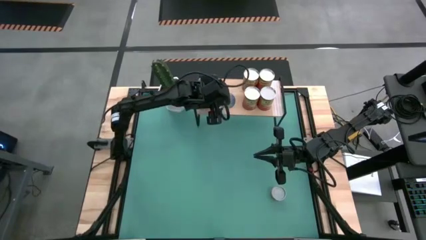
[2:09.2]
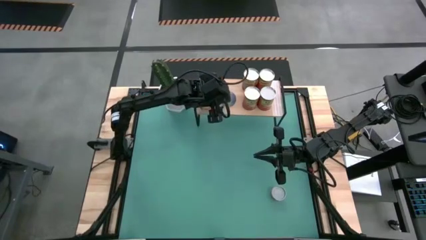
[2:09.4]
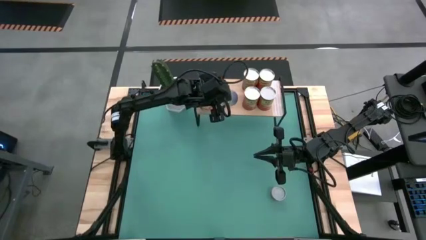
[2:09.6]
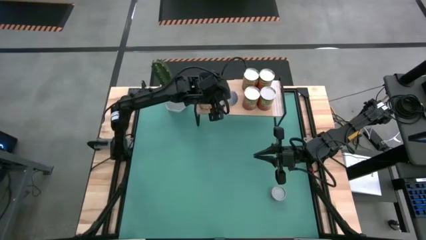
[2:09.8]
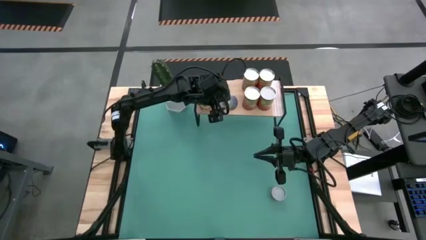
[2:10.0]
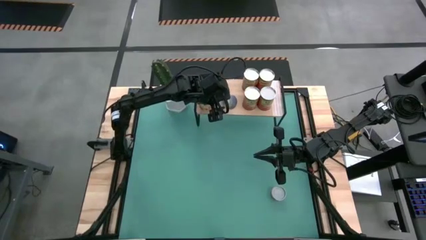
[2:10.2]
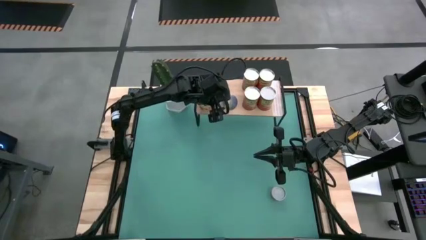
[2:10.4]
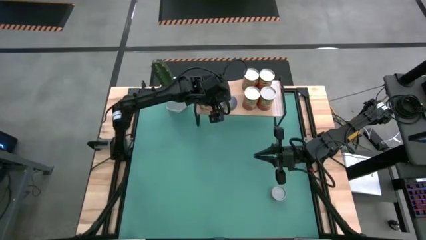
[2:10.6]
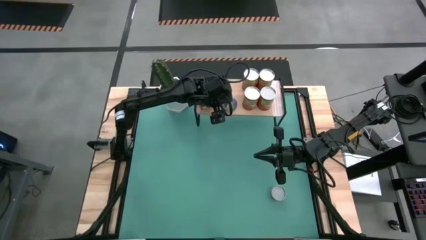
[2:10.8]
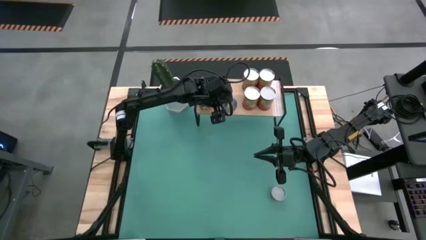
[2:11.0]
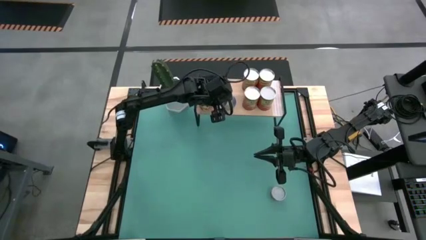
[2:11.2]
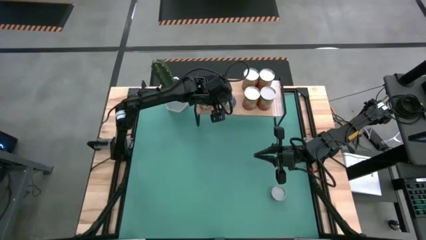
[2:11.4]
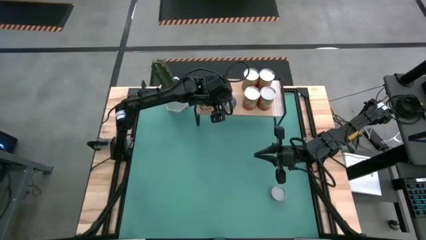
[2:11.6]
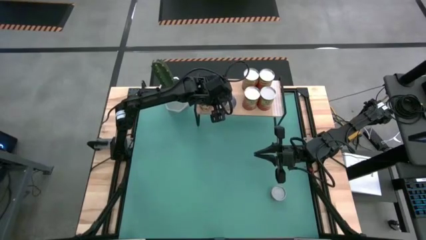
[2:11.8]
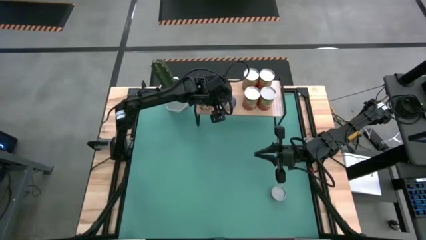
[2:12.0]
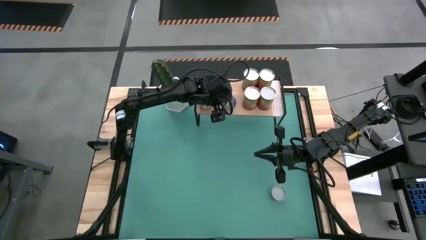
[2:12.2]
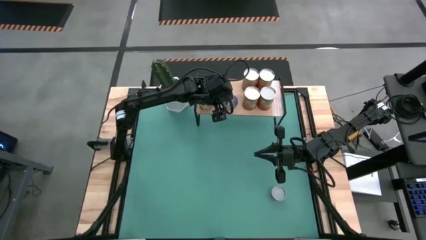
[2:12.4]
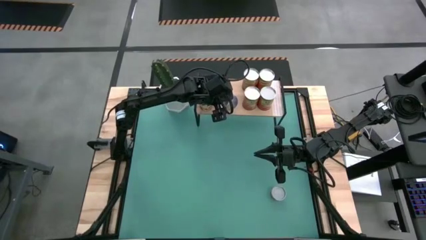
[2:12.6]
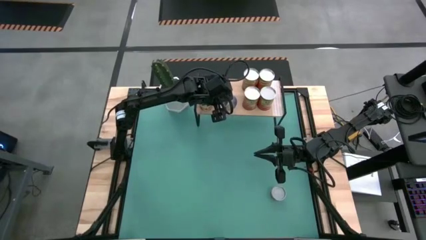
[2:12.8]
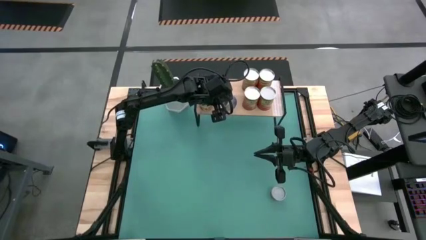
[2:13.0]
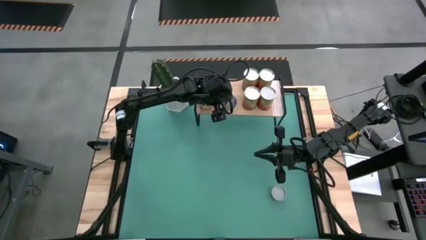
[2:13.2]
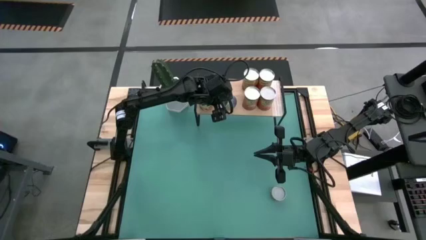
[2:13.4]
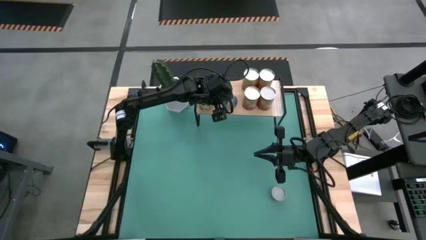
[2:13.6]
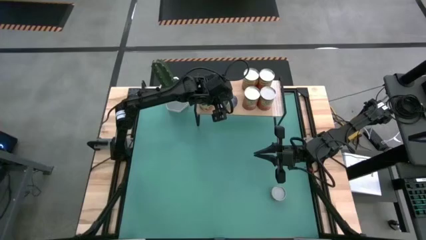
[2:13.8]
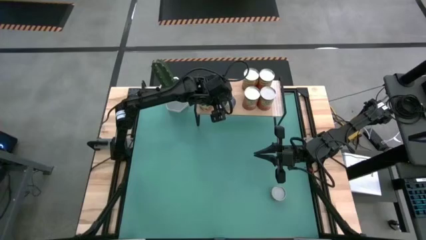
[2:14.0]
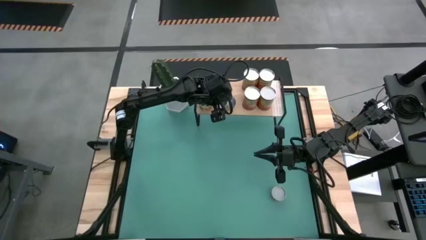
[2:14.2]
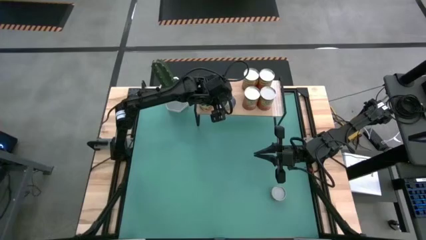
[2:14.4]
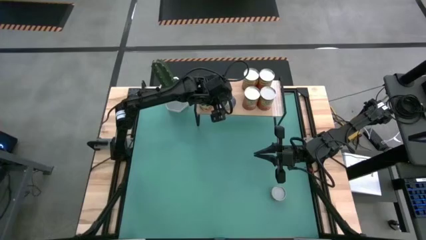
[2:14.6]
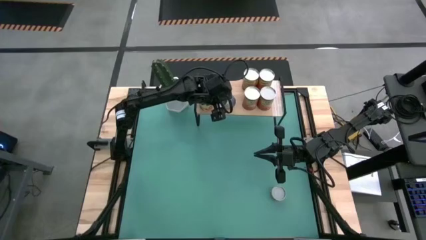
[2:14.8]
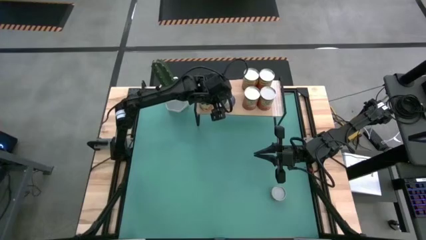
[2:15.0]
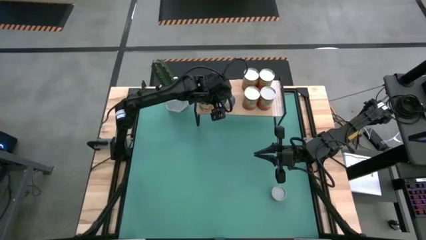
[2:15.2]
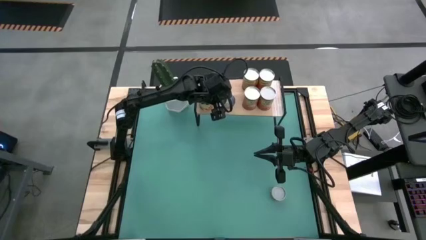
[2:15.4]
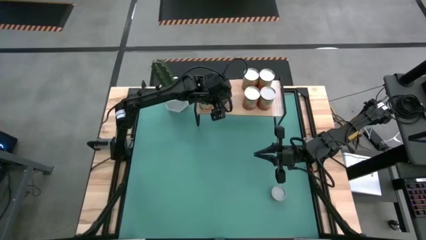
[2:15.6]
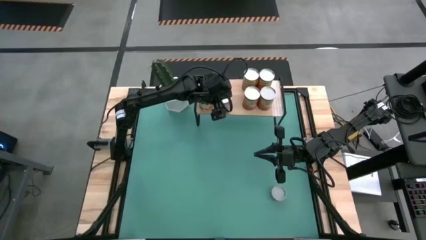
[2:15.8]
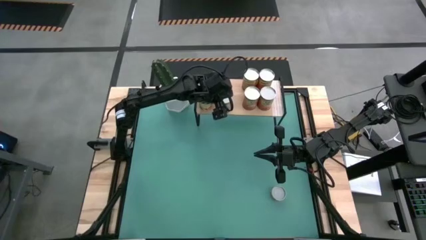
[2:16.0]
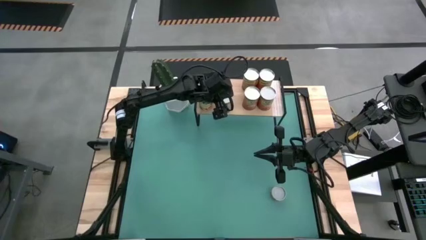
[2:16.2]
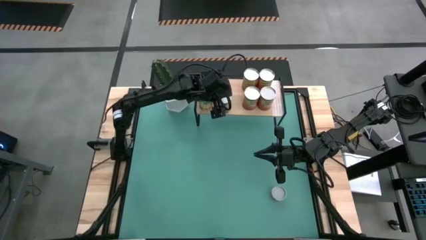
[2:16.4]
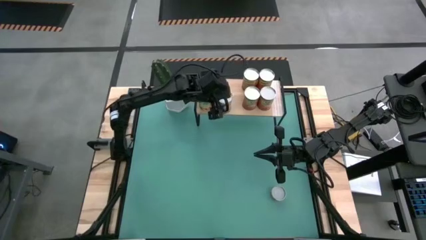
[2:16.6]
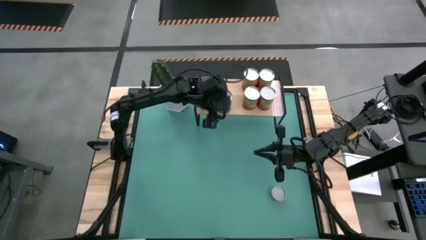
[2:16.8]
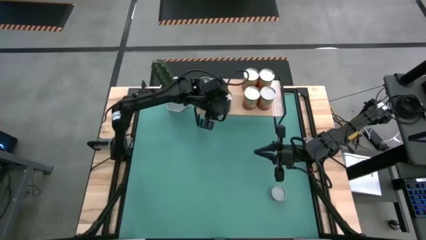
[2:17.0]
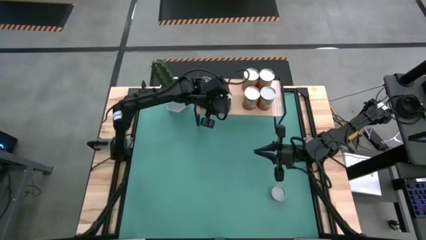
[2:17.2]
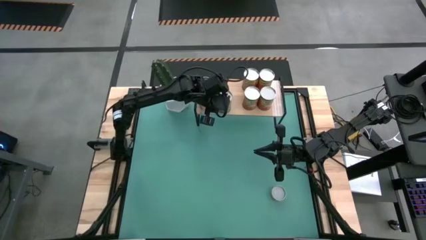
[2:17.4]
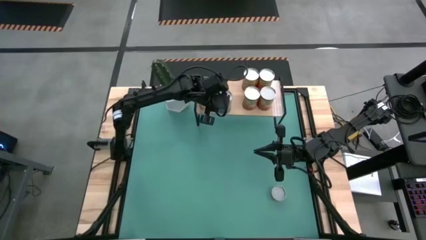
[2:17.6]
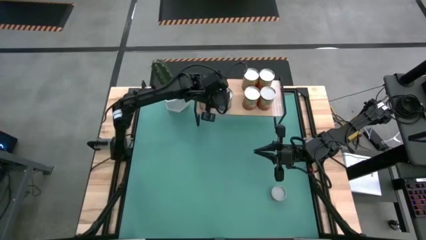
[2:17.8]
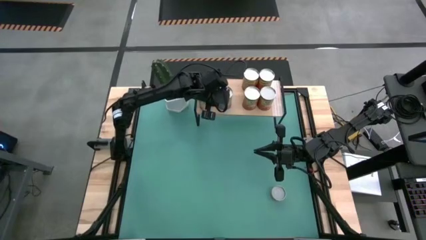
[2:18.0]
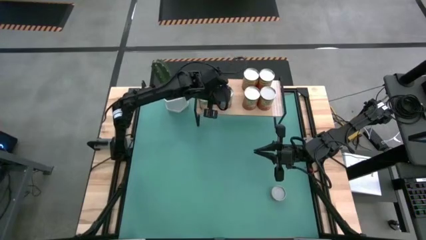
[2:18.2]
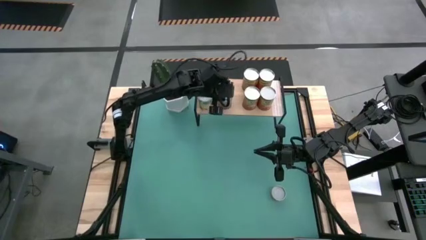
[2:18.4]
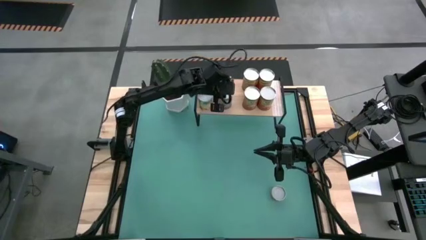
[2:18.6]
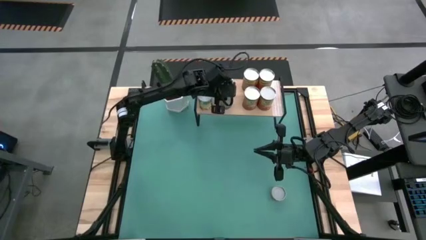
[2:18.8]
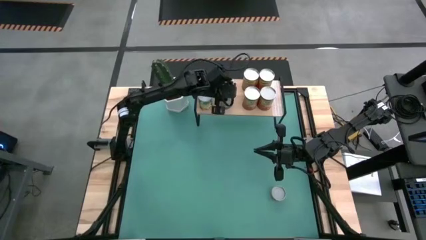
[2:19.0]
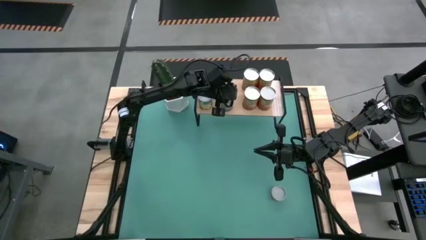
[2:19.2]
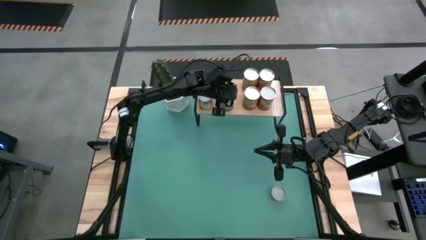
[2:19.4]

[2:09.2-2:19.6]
Task: Pick and place cans onto a shelf
Put the canned peas on the shelf

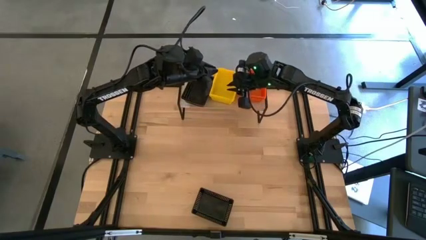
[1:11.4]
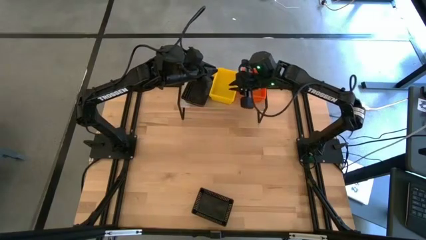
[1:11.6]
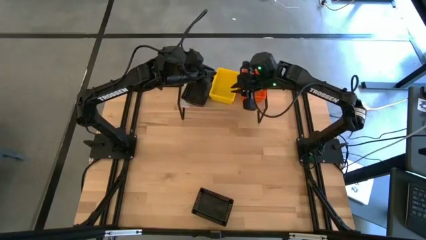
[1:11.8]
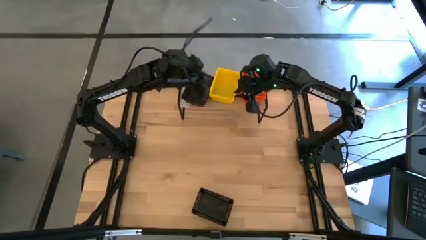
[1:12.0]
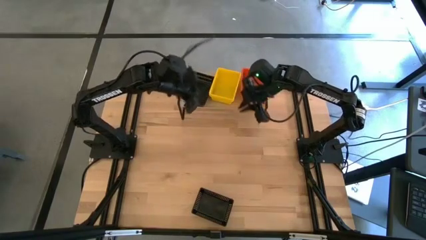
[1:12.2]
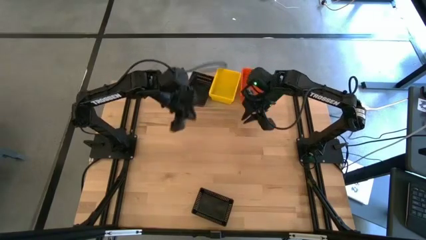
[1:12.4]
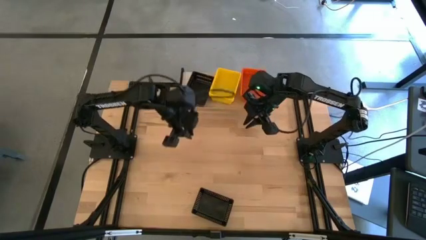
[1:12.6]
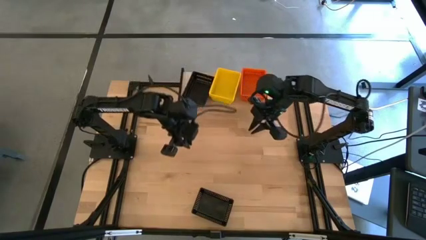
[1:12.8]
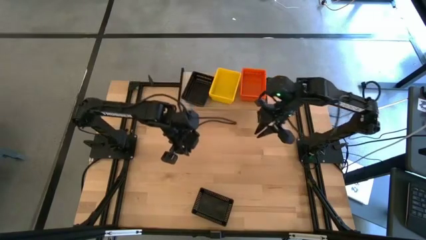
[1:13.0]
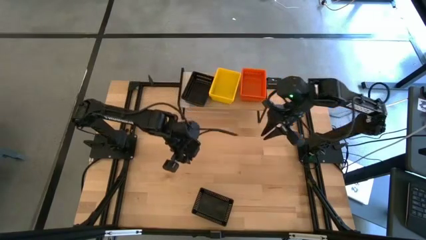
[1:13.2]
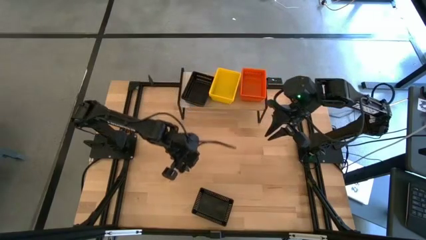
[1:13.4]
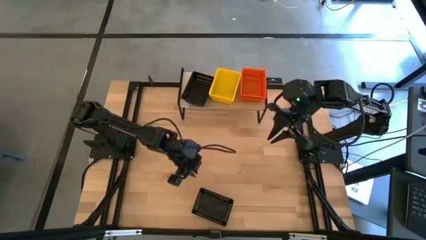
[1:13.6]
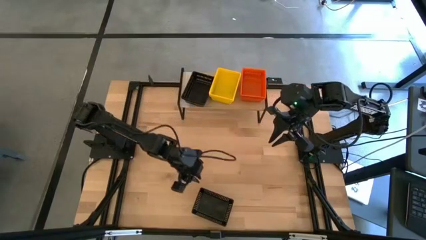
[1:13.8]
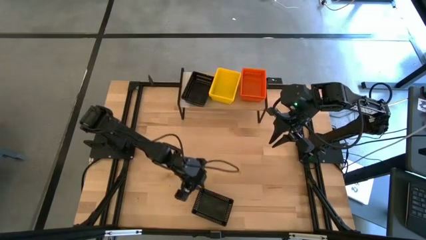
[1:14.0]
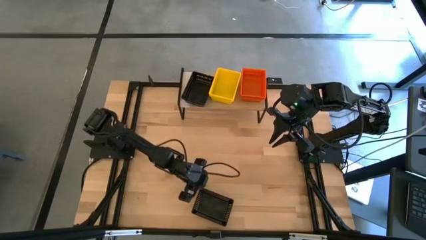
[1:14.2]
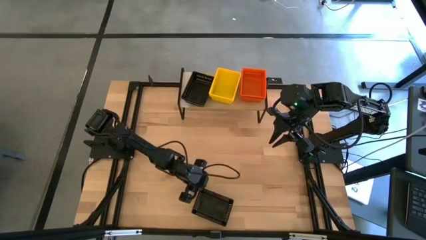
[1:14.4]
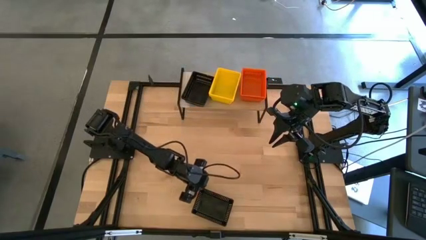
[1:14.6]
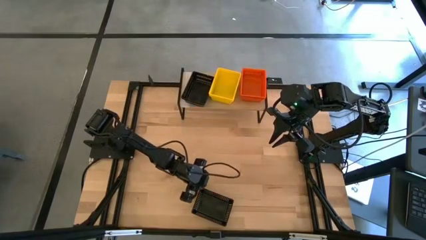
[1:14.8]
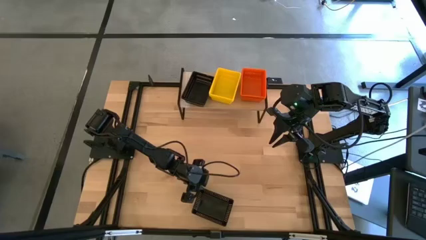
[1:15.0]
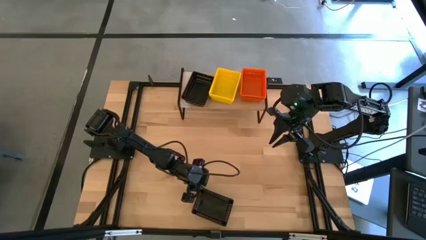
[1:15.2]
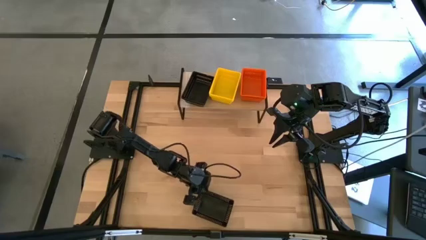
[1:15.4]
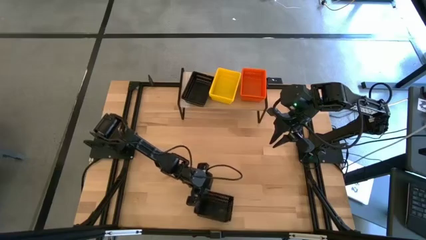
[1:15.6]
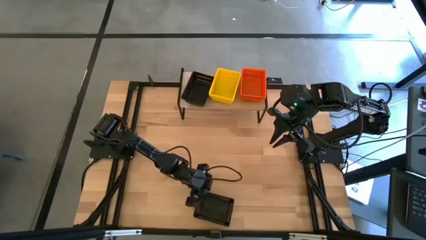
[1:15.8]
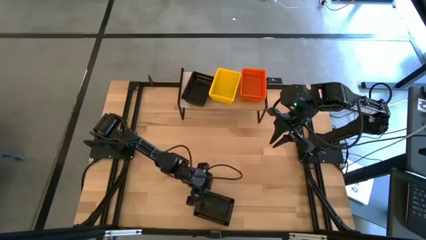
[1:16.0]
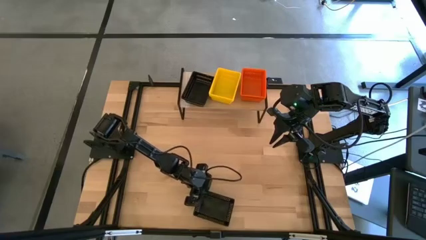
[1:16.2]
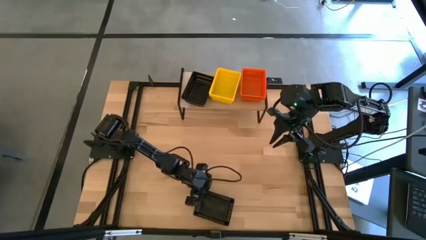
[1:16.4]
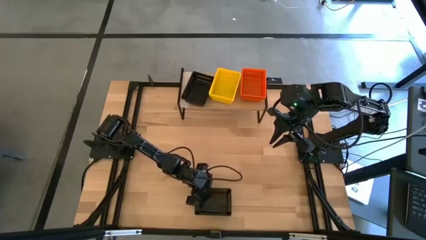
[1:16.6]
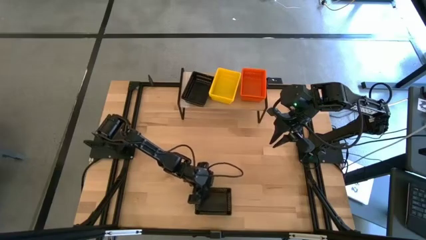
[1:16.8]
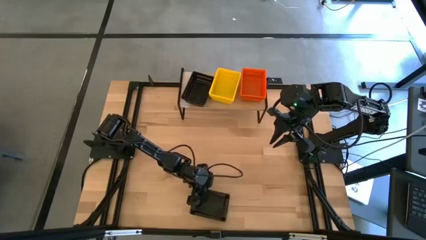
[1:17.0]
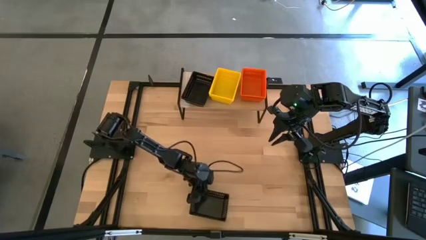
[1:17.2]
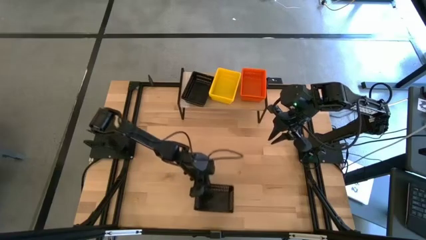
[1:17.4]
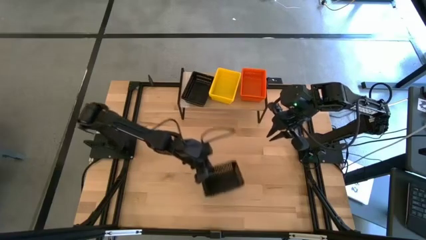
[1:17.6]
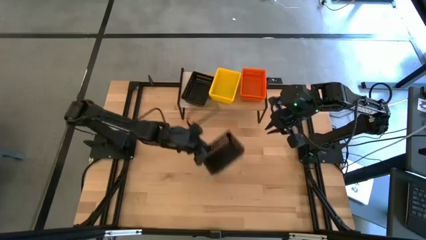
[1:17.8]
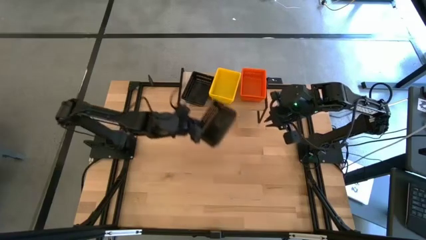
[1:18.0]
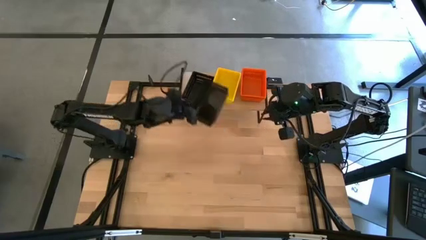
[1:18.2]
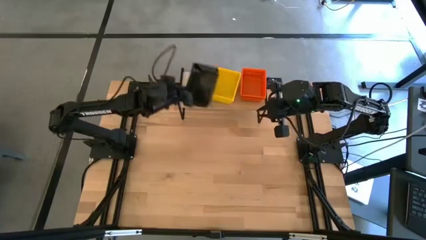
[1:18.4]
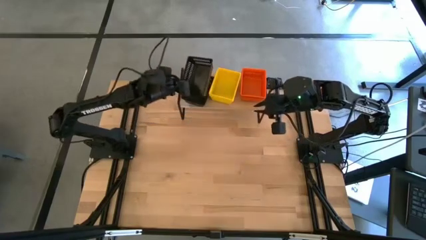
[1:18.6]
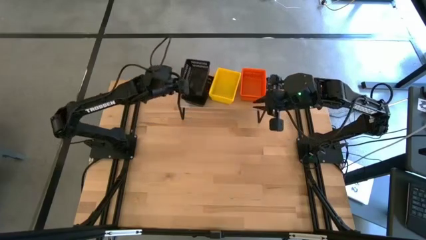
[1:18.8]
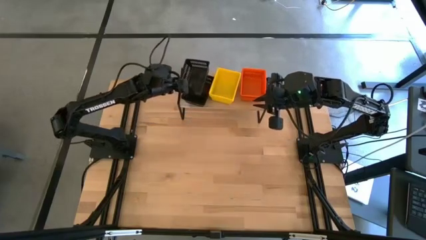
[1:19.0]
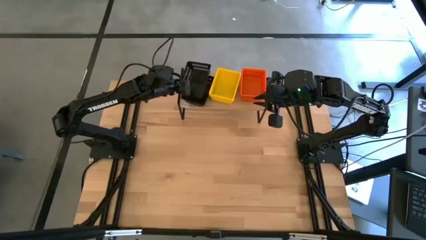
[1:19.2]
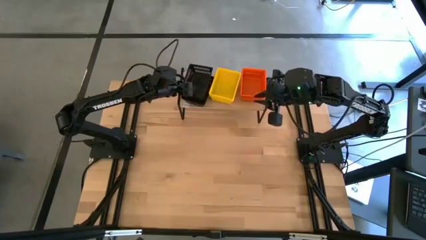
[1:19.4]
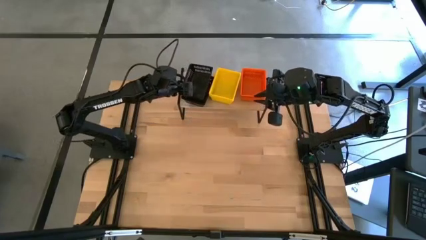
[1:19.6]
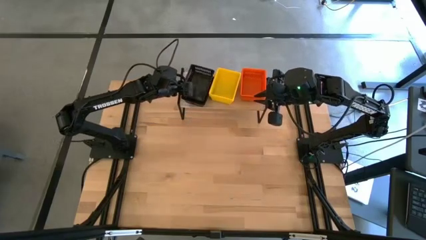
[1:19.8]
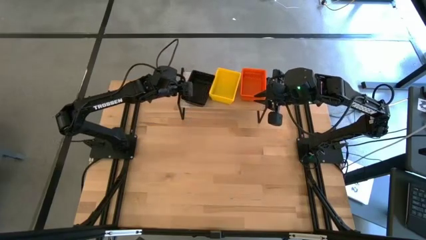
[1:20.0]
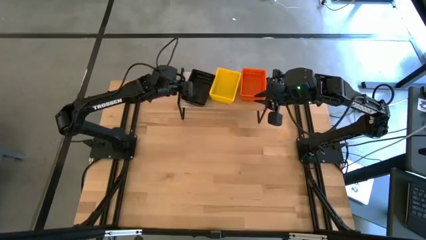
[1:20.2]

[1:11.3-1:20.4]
Task: Stack baskets on shelf by color
Stack the black basket on the black baskets on the shelf
